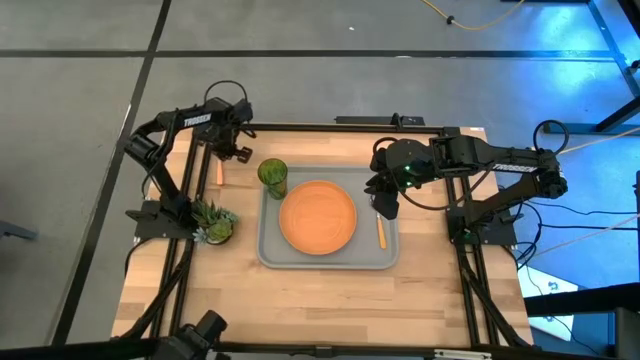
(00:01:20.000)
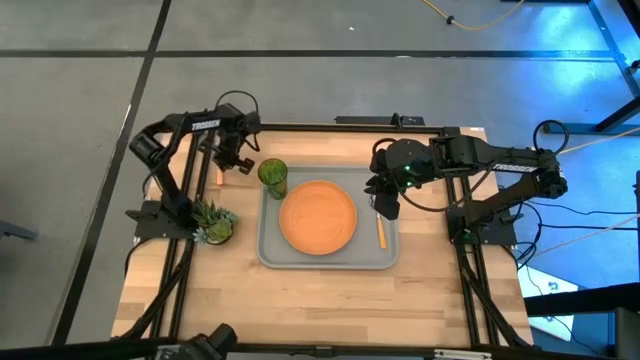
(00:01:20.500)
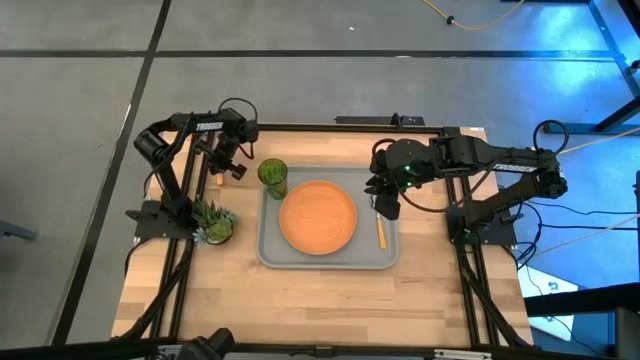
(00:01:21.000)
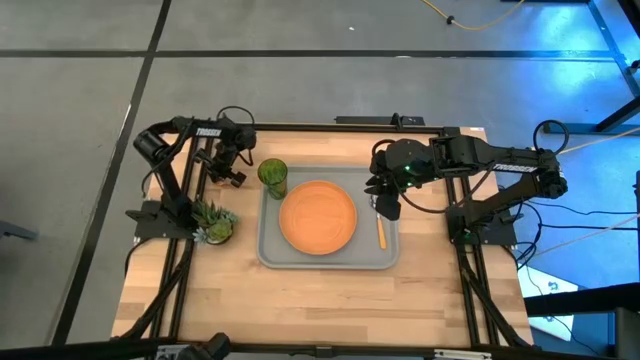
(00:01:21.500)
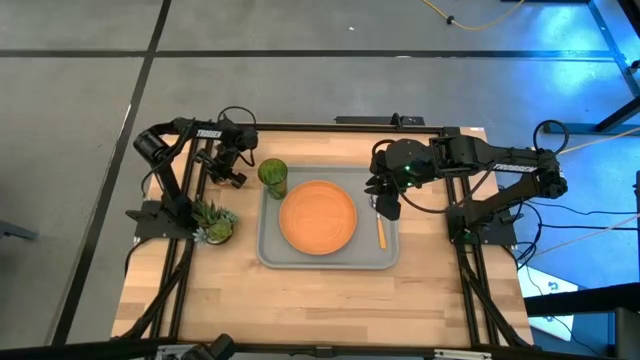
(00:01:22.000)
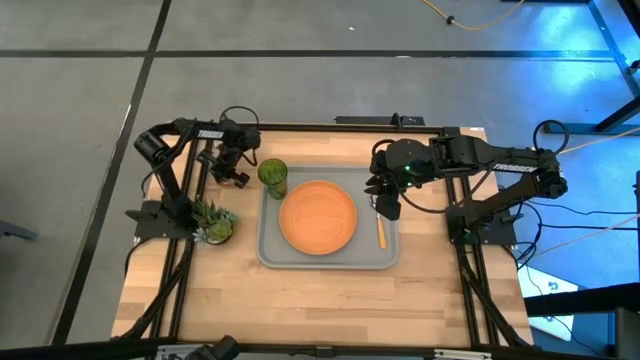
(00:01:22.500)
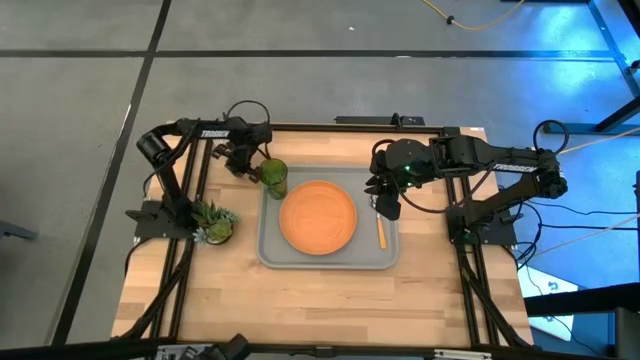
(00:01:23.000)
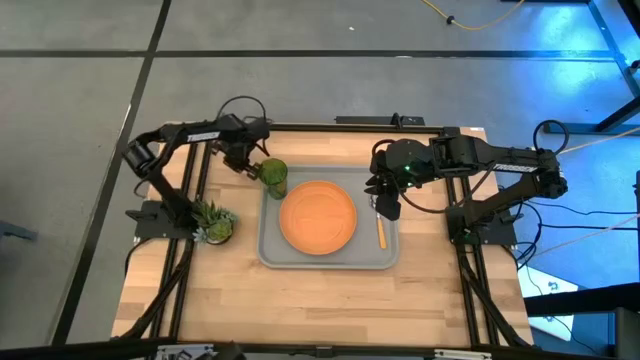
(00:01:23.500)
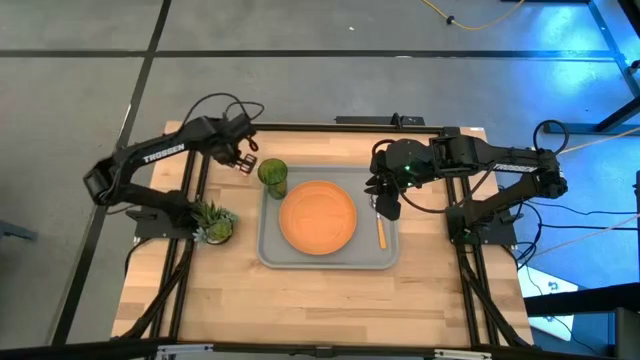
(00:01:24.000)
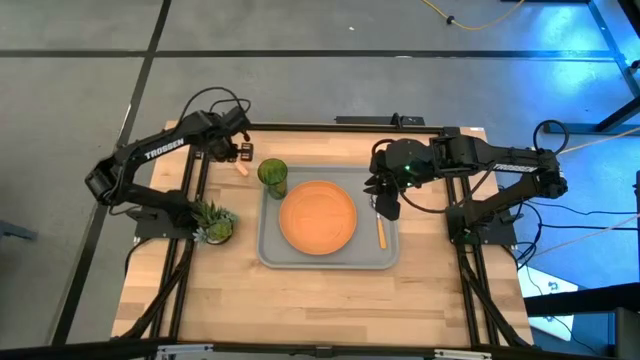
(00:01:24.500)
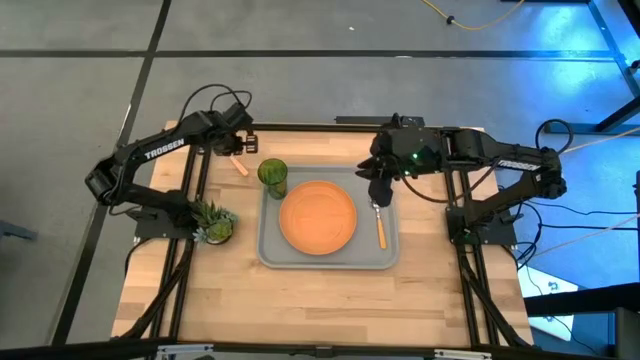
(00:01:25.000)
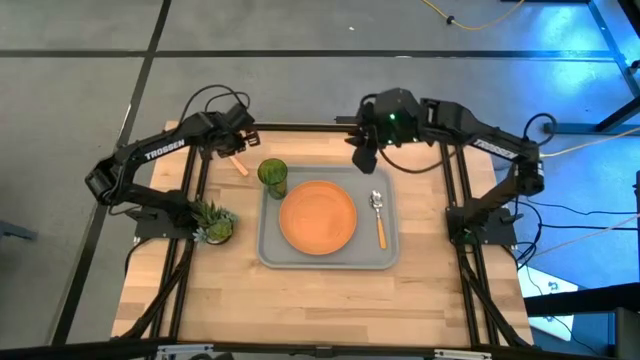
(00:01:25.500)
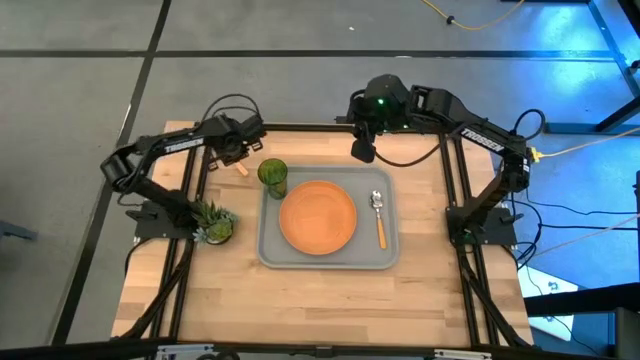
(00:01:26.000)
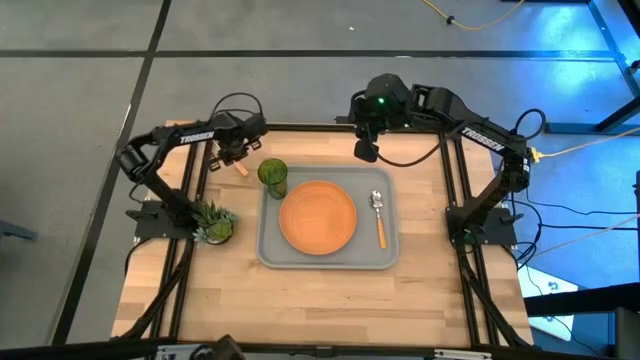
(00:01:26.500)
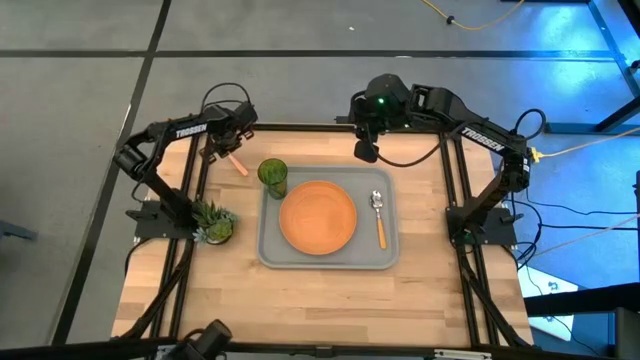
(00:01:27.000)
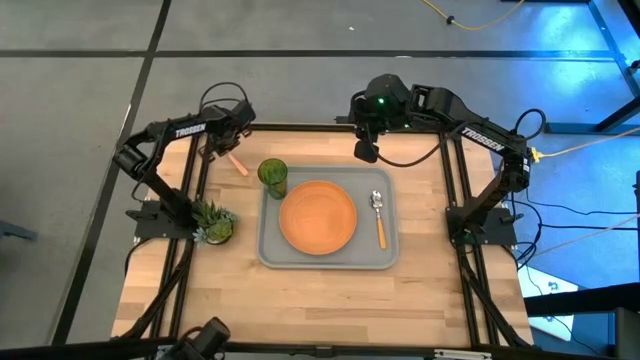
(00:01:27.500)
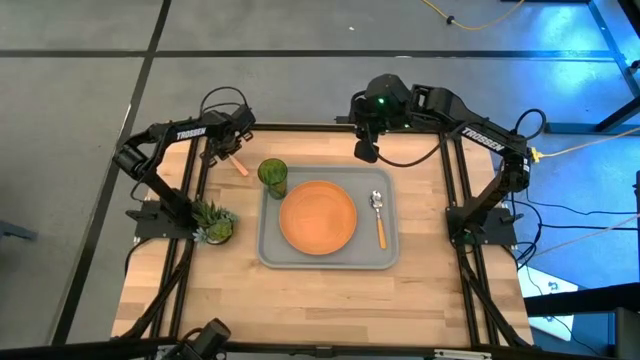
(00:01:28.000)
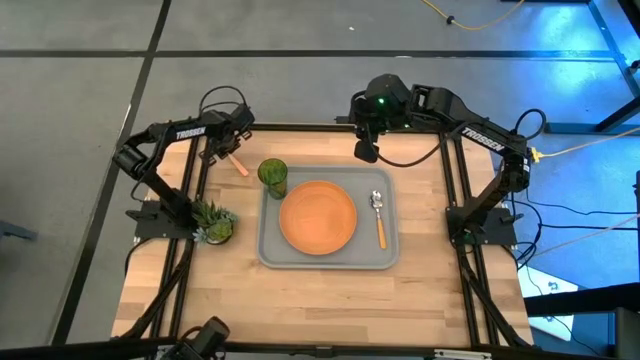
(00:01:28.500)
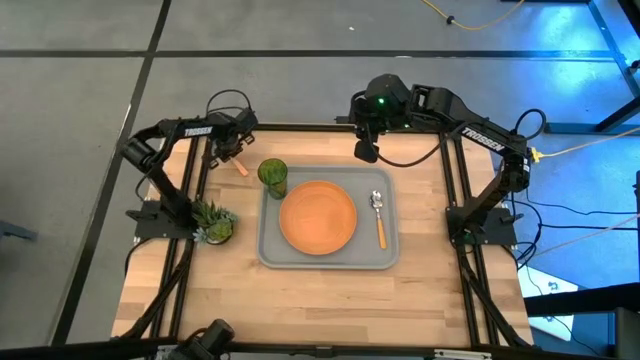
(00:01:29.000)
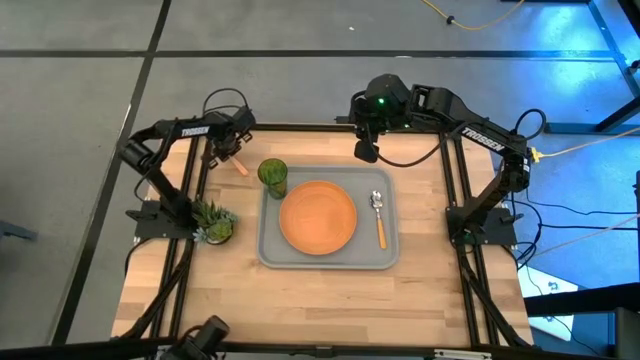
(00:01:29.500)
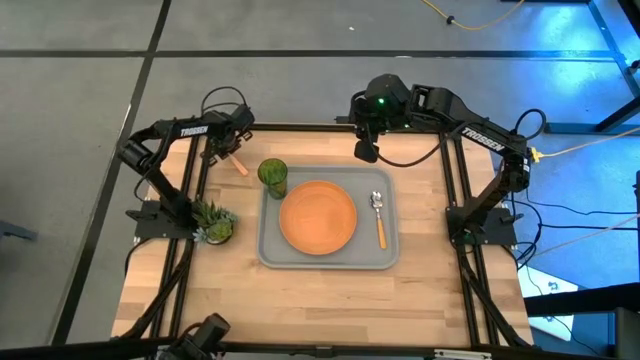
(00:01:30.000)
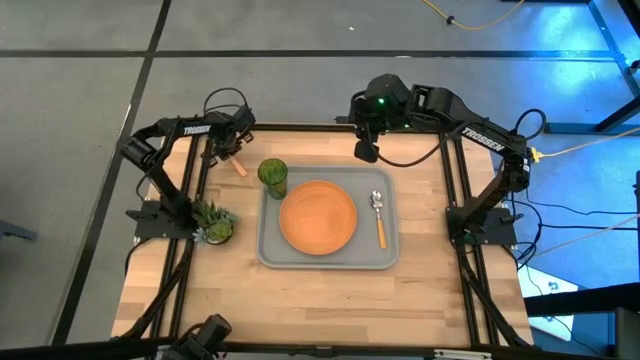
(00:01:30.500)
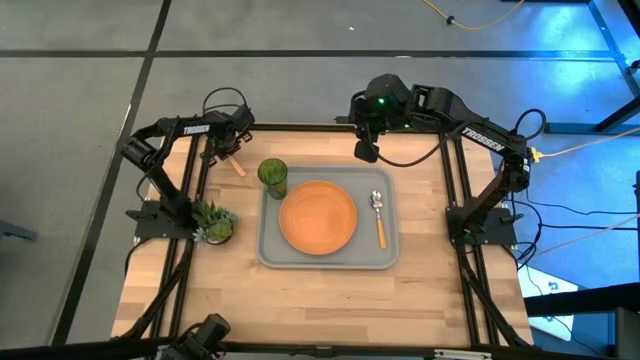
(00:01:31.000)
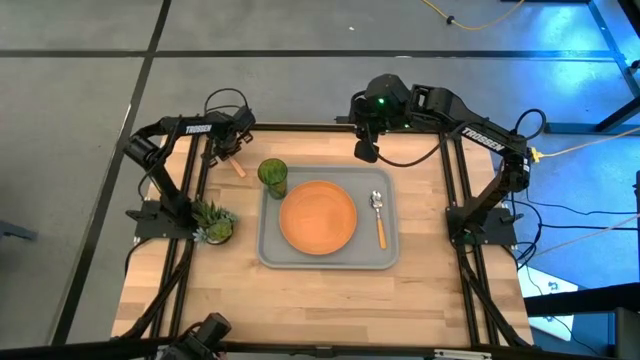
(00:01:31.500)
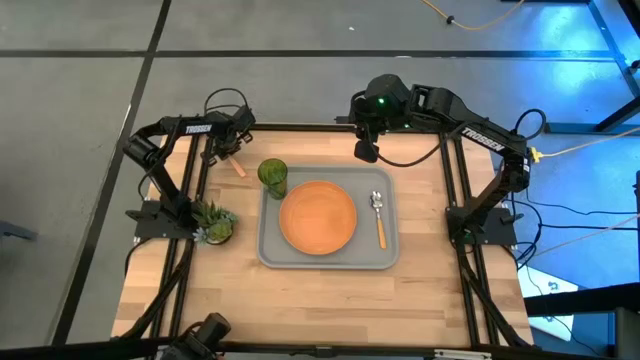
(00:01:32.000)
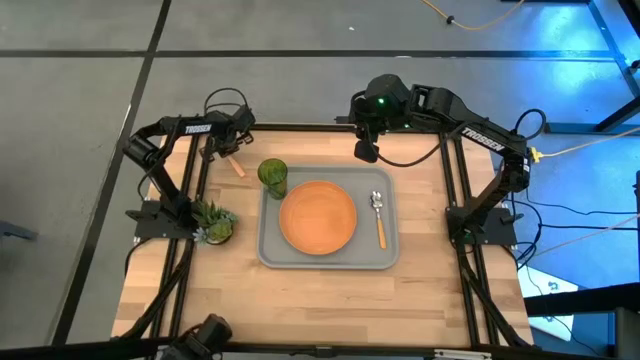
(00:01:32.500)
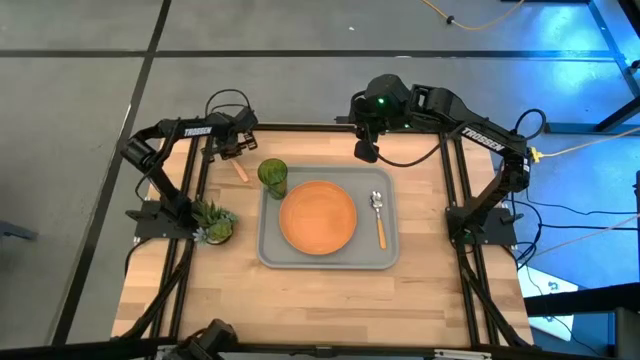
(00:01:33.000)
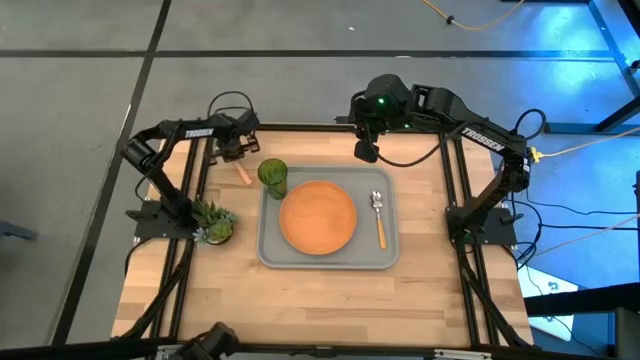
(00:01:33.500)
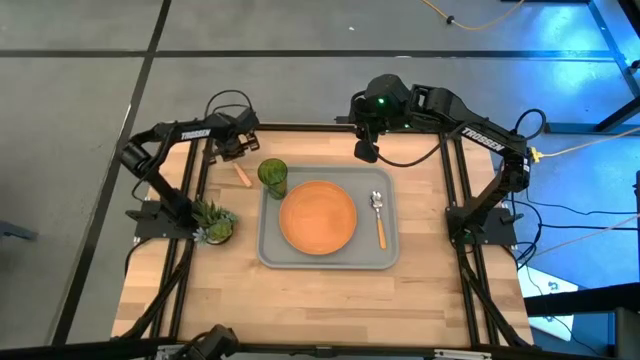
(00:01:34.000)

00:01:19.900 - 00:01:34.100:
Task: Pick and place plate/cup/fork/spoon on tray
Put the orange fork on the gray food tray to the right of the orange plate

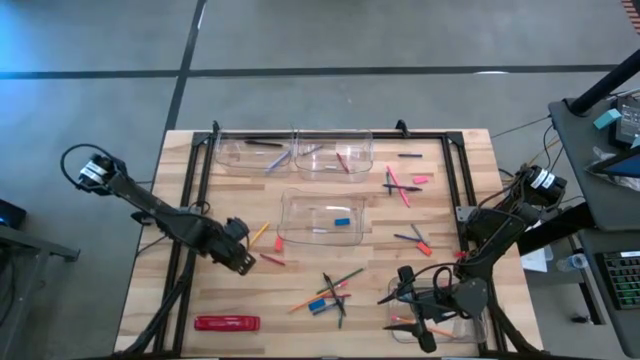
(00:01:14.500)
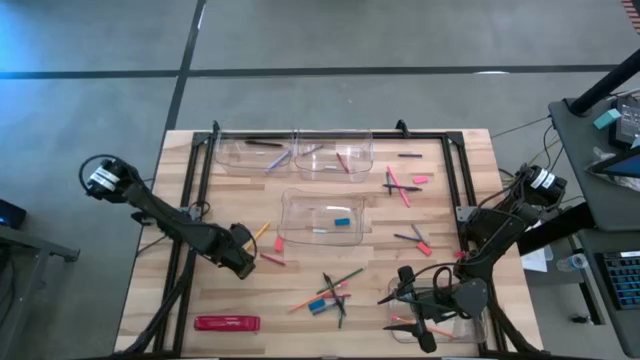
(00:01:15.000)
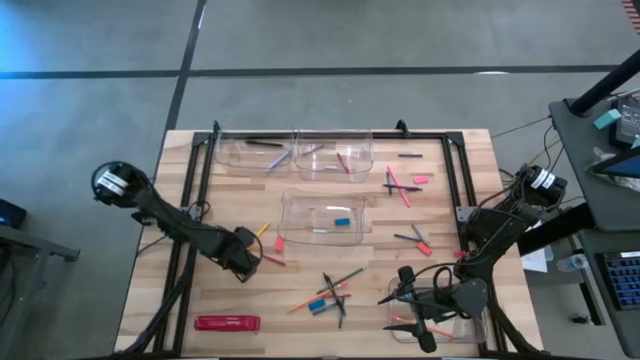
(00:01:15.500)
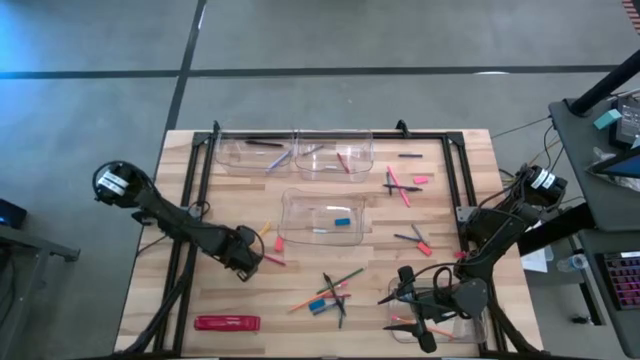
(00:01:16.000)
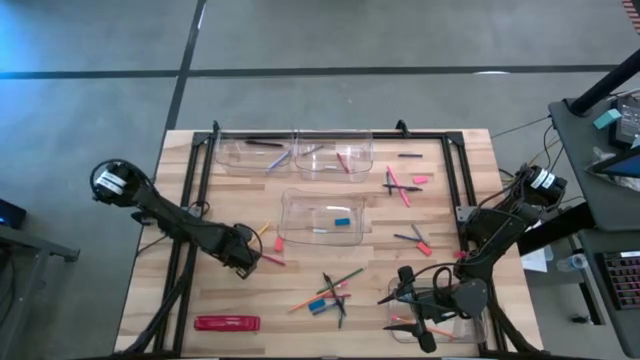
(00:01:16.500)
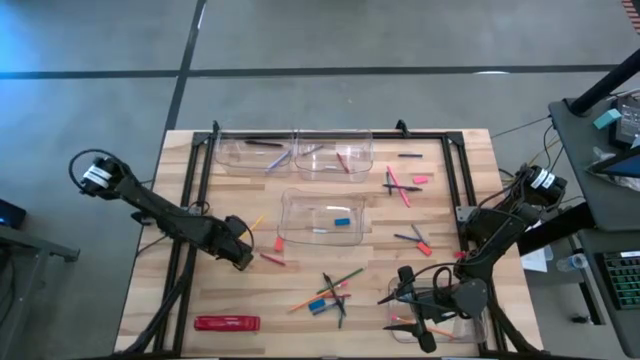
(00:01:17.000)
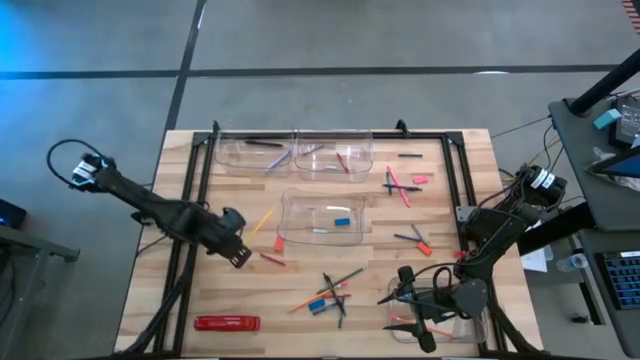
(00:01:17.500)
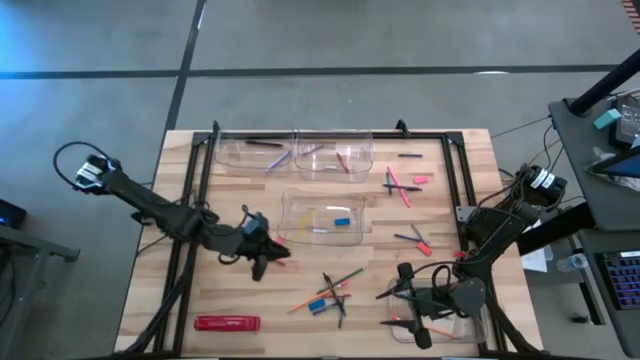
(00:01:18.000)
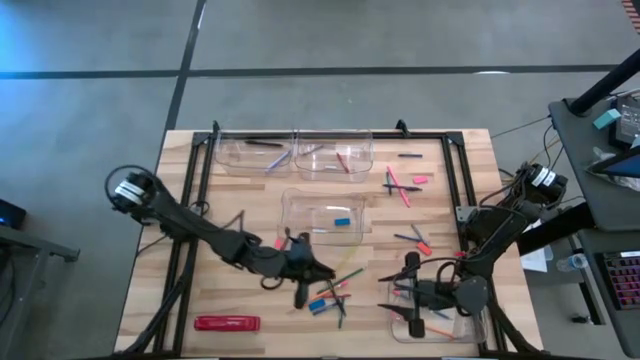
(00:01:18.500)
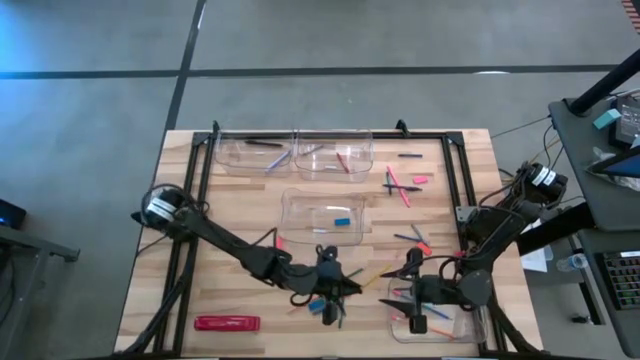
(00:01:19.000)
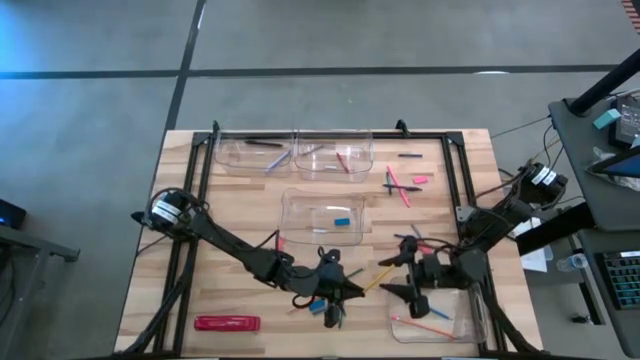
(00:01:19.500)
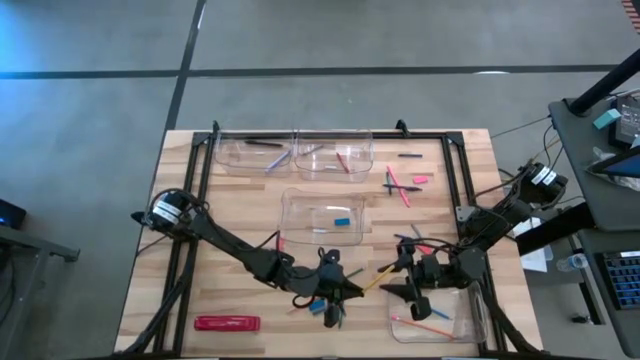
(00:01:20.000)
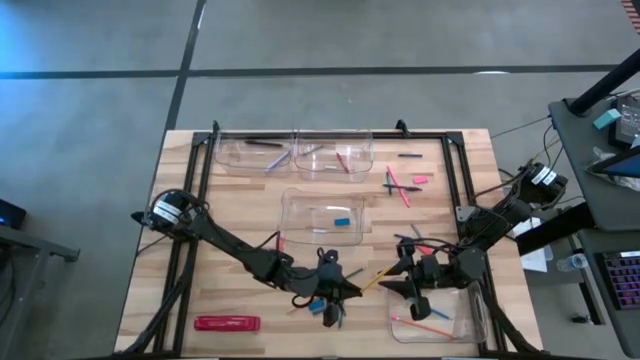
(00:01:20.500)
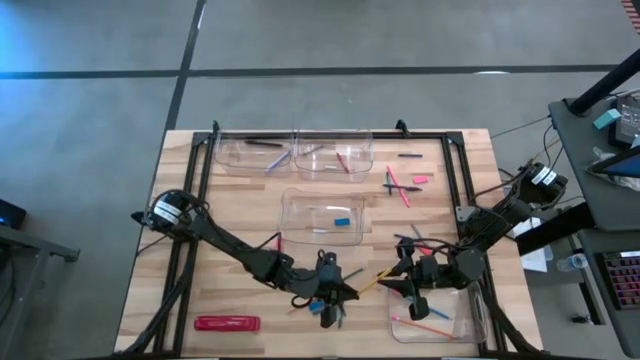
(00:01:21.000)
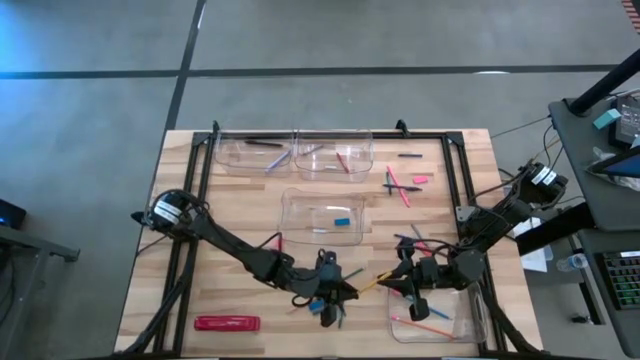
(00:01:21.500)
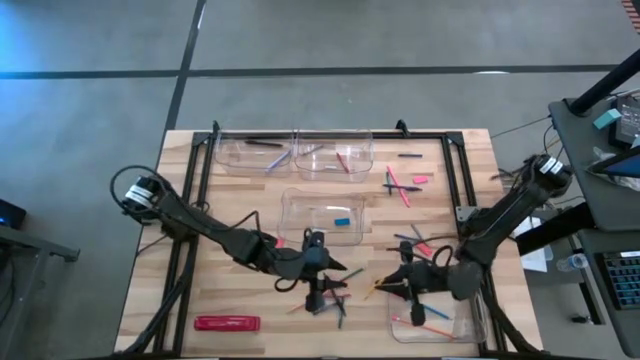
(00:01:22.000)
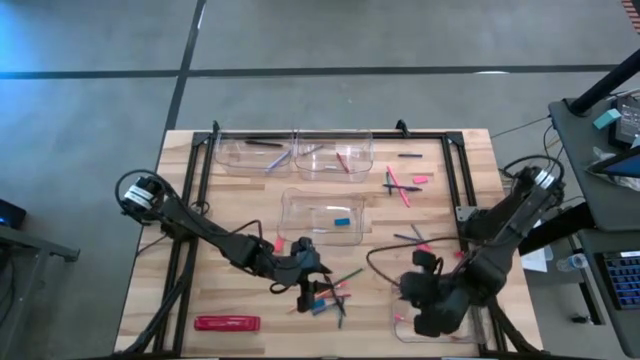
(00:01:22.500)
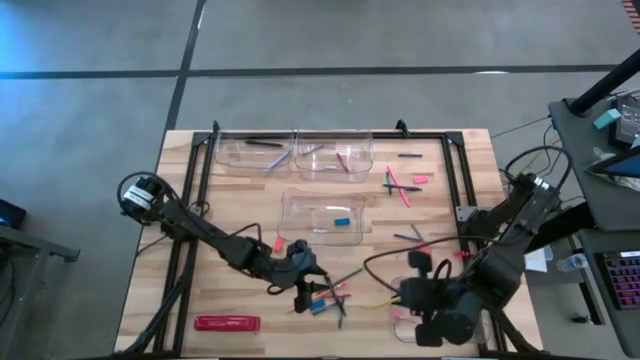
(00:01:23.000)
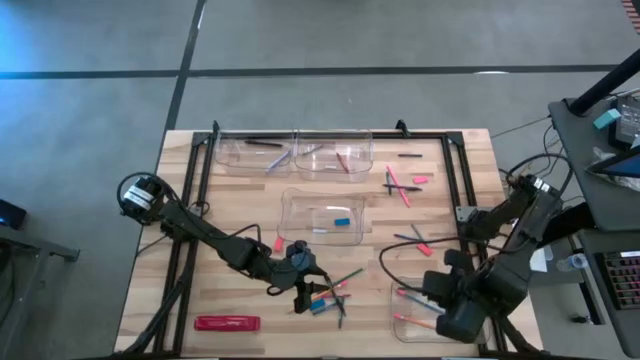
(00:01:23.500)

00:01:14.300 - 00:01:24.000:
Task: Sort crayons/erasers/pens/pencils in bins
Put the yellow pencil into the bottom transparent bin
